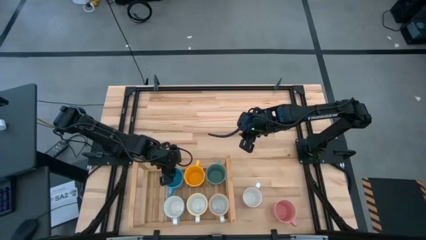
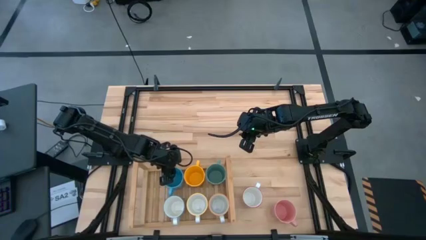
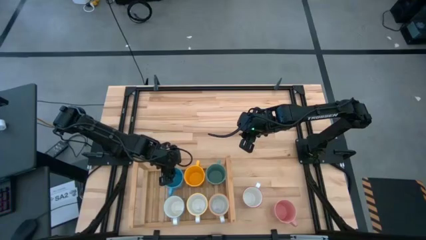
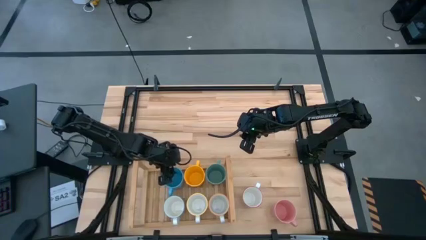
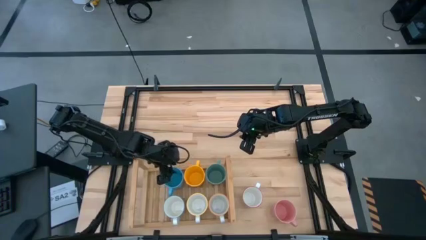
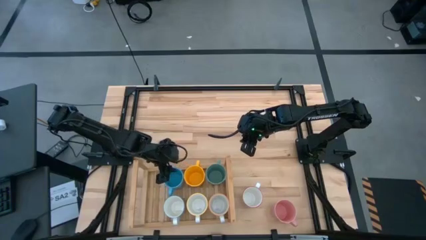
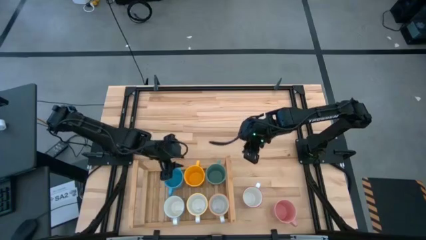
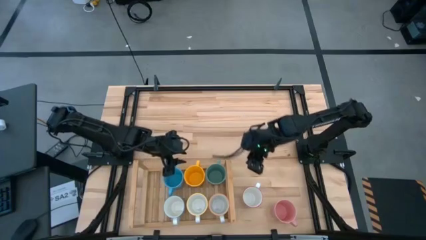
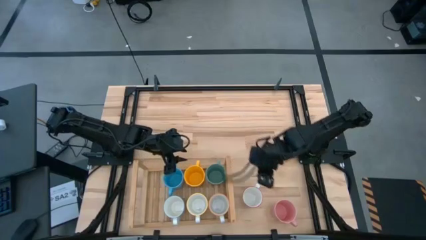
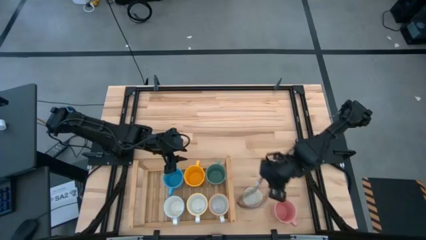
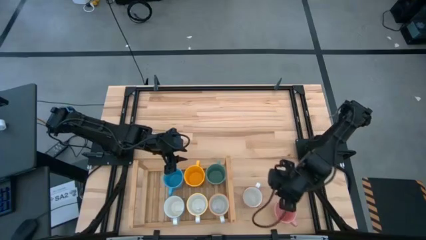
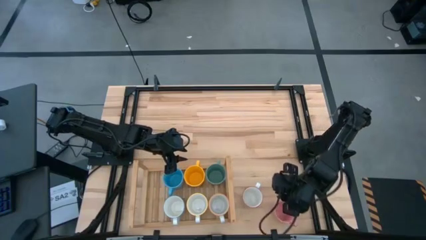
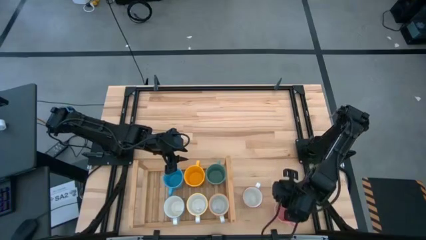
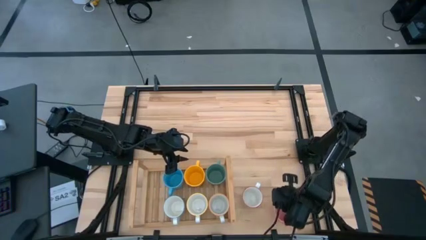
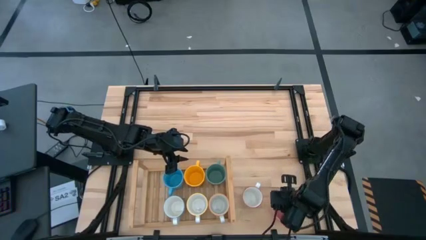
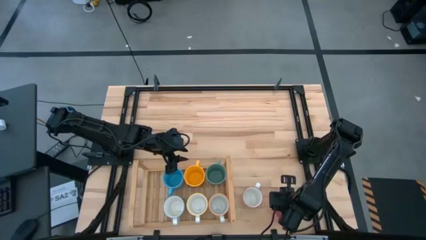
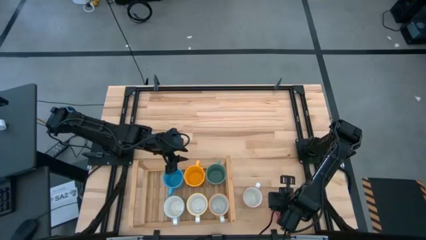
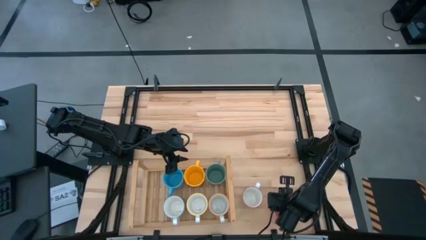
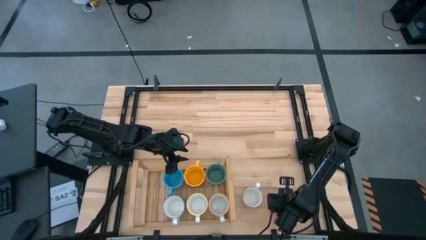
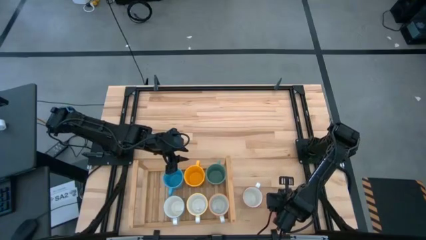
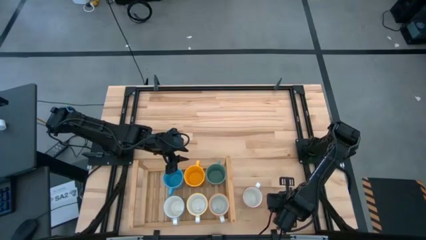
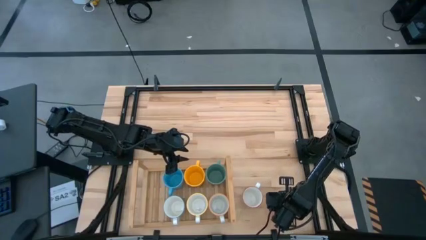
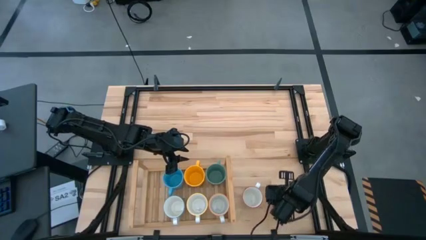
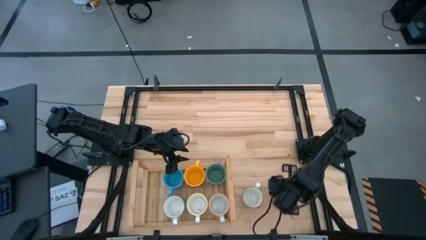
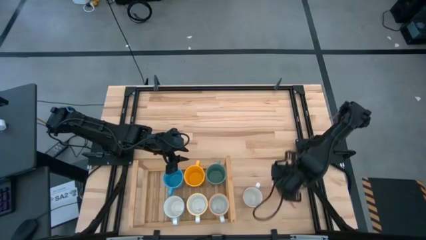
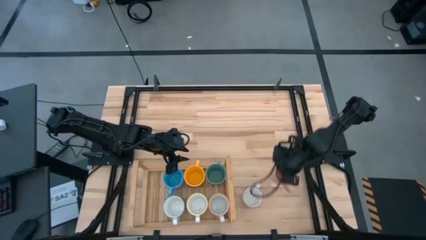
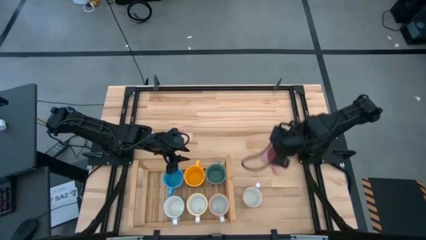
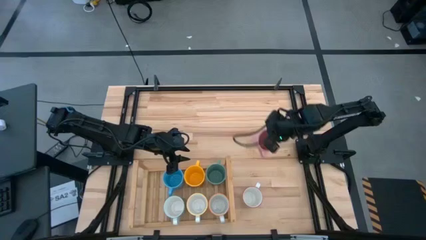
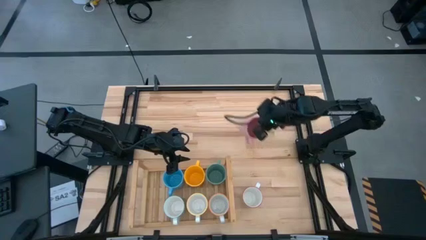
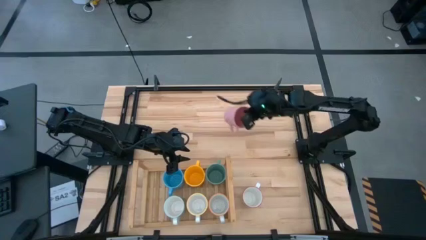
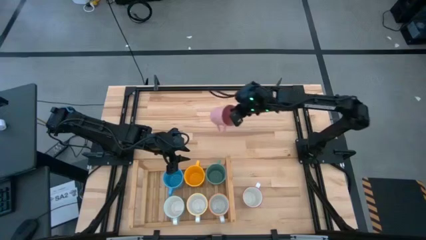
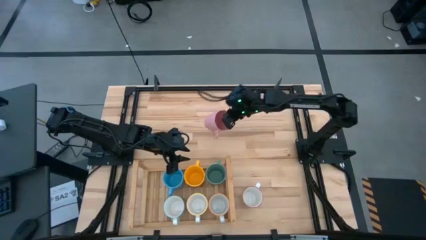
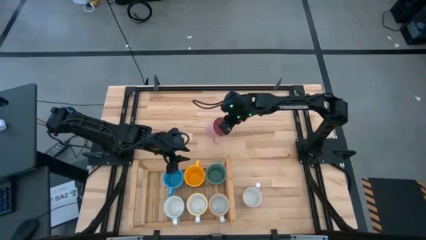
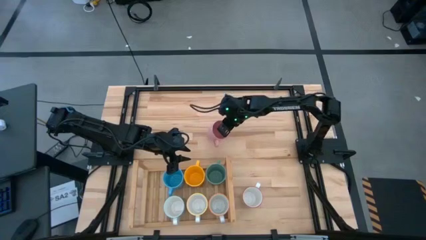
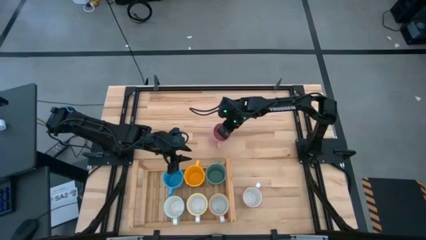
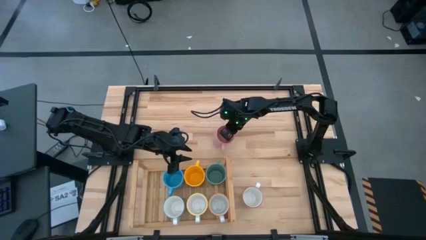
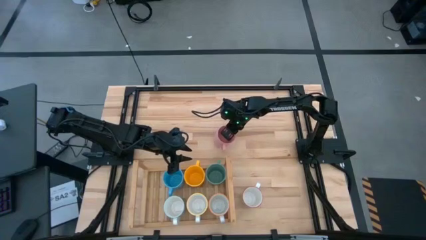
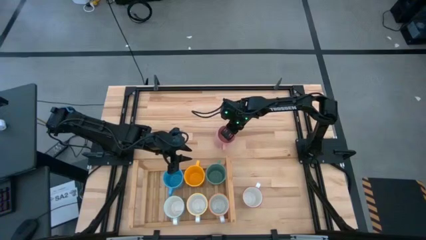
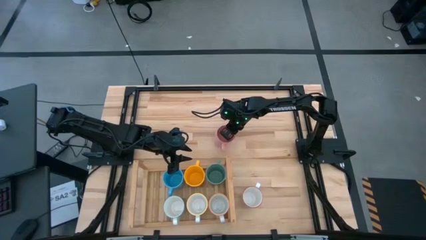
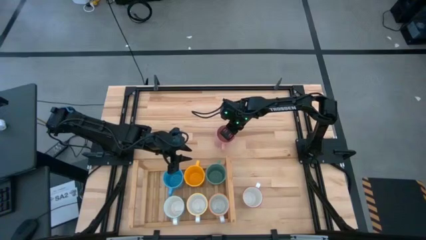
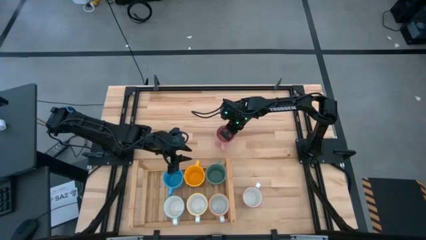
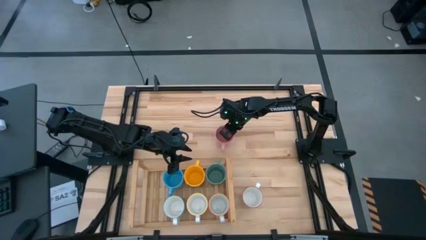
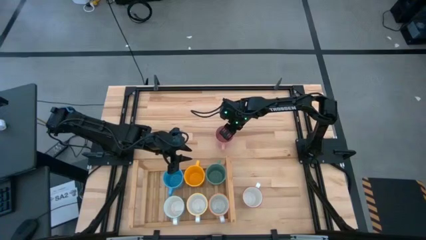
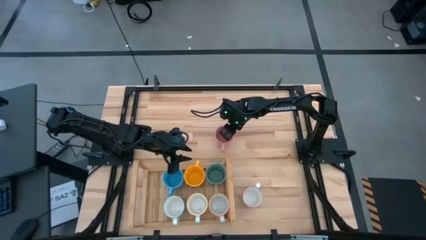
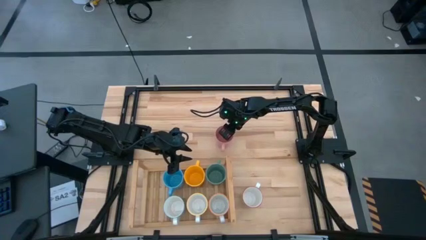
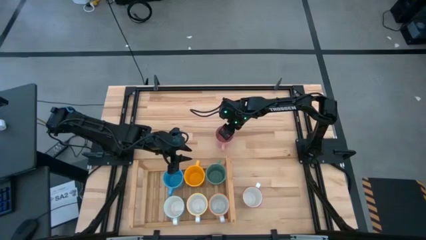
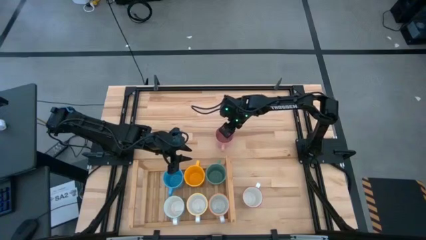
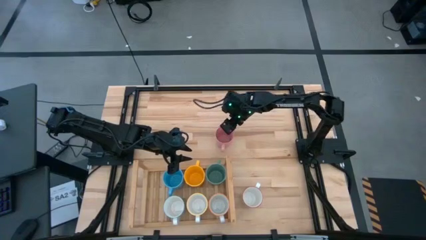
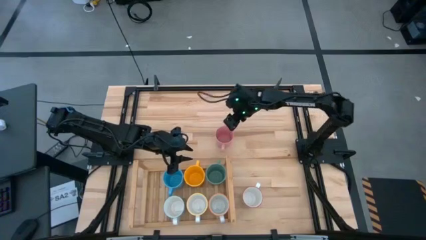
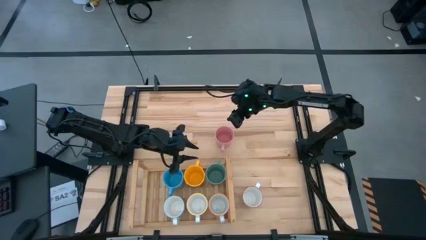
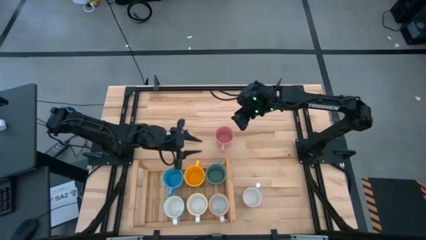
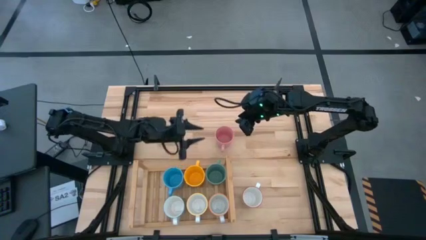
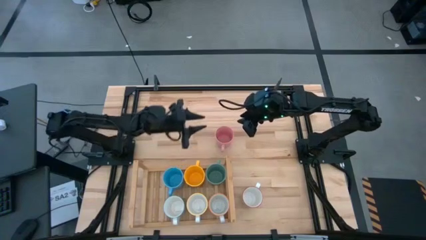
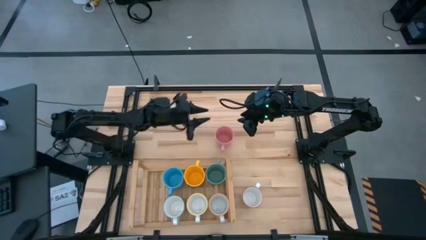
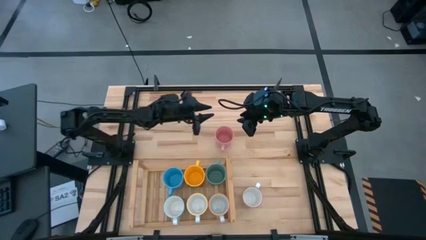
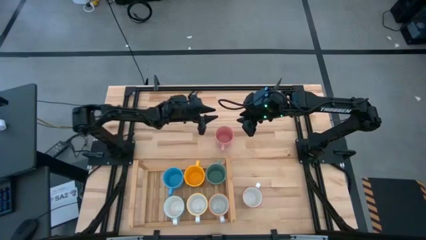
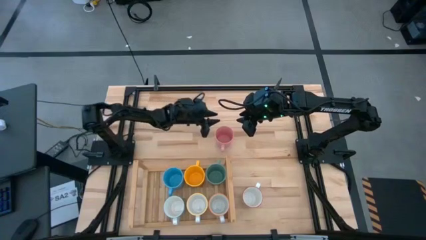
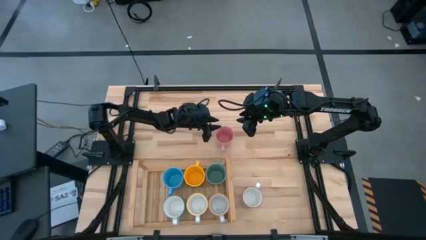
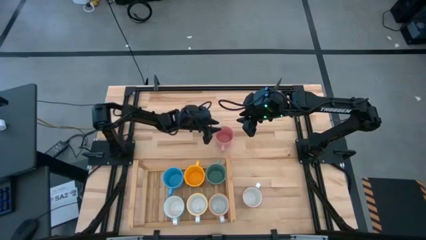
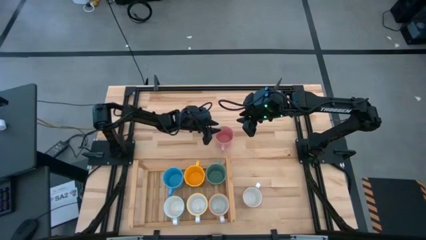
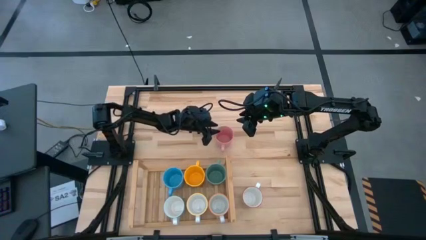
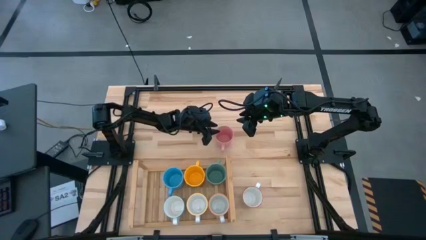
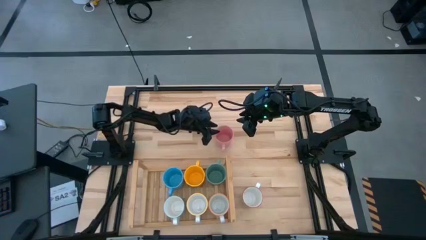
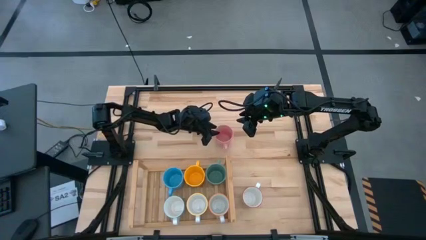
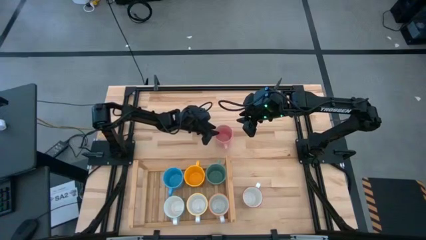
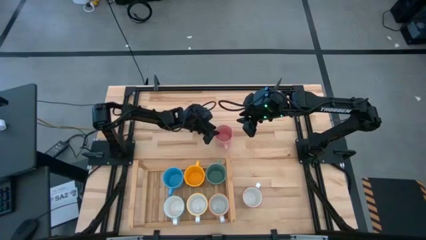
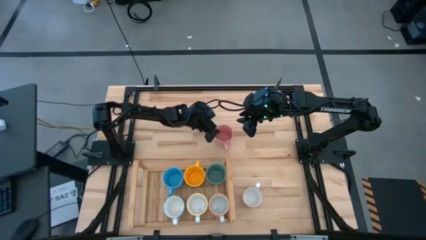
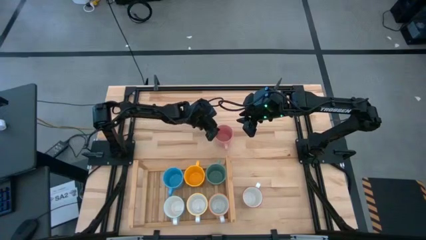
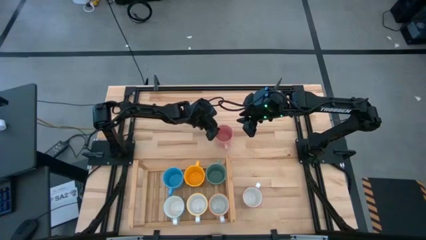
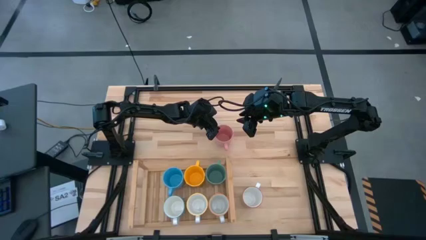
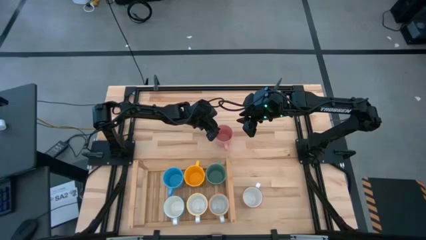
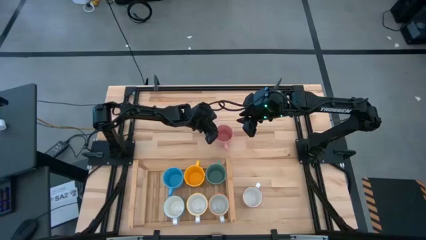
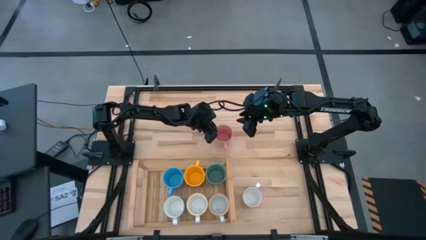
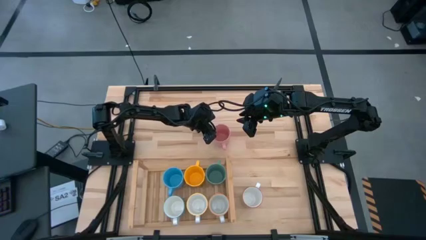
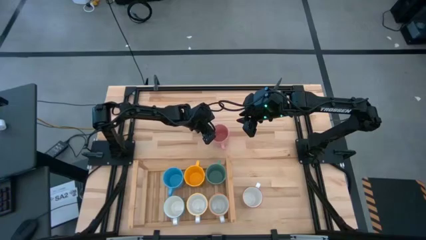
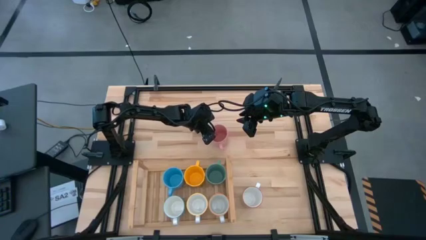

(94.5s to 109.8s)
Task: Place coffee mugs
Put the pink mug on the shelf
